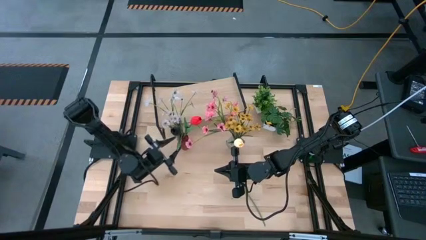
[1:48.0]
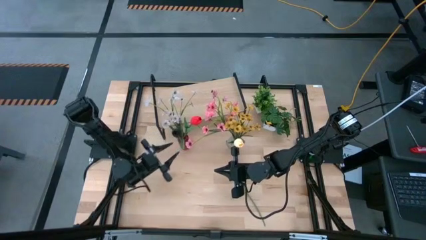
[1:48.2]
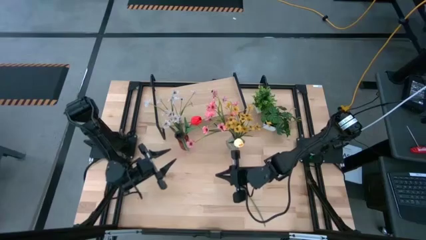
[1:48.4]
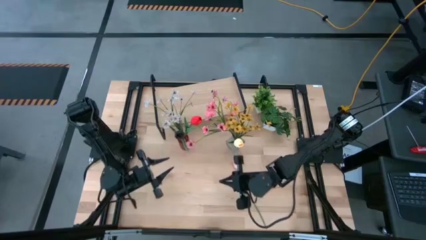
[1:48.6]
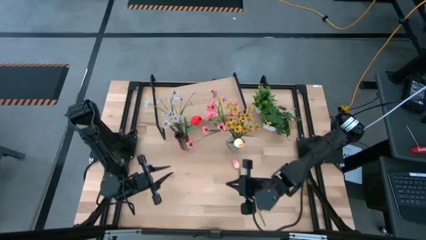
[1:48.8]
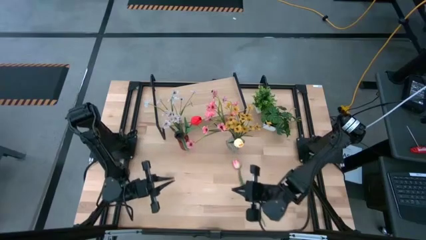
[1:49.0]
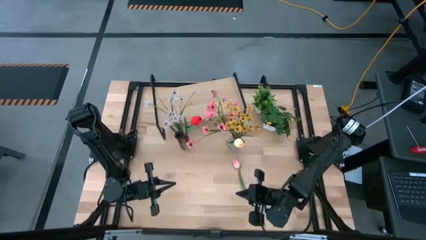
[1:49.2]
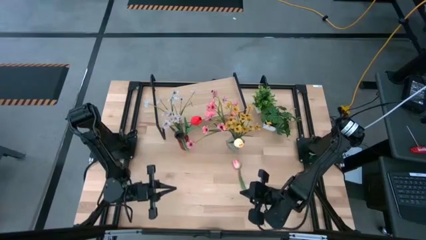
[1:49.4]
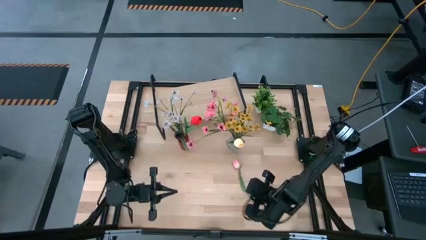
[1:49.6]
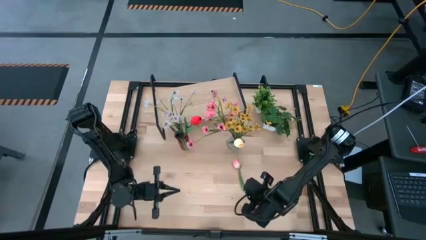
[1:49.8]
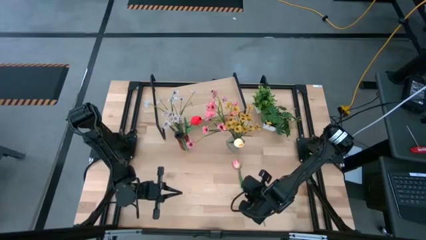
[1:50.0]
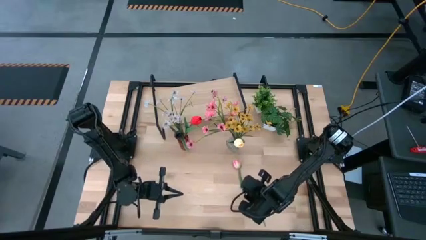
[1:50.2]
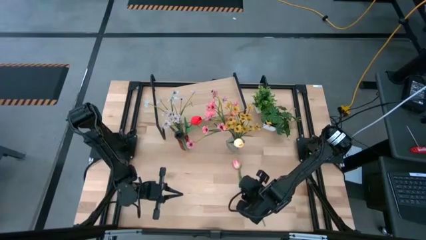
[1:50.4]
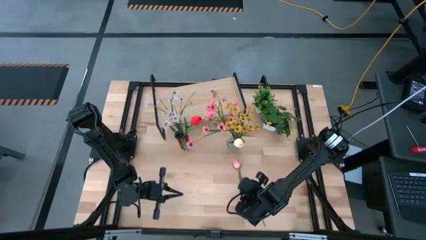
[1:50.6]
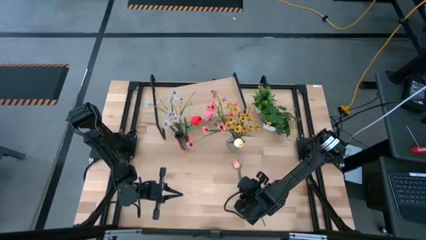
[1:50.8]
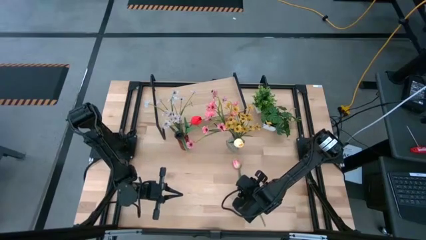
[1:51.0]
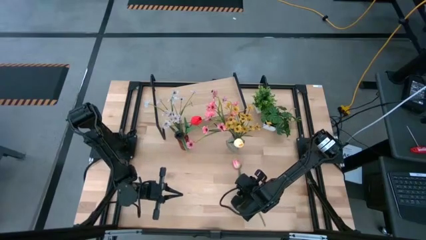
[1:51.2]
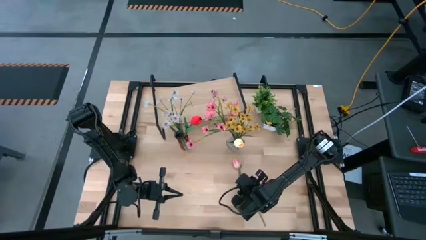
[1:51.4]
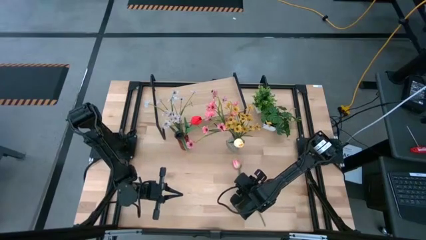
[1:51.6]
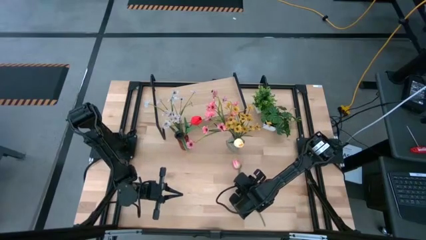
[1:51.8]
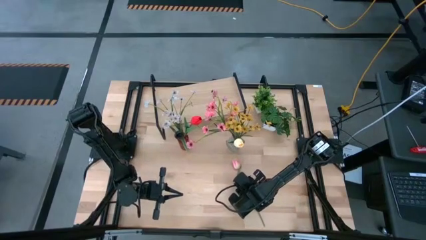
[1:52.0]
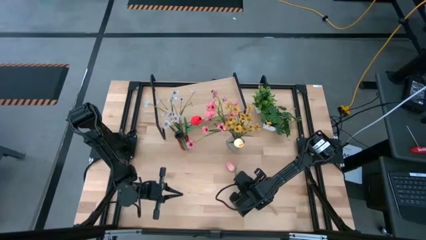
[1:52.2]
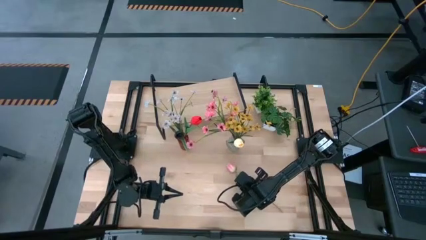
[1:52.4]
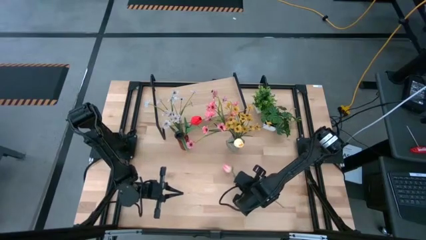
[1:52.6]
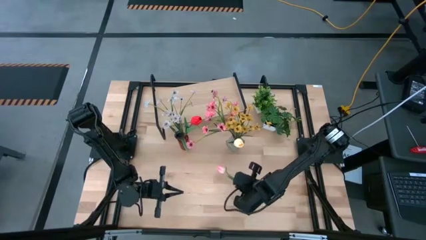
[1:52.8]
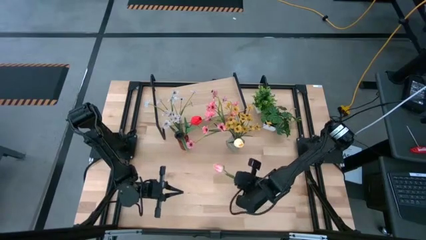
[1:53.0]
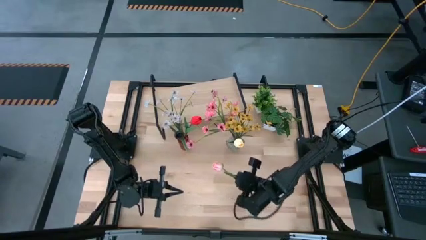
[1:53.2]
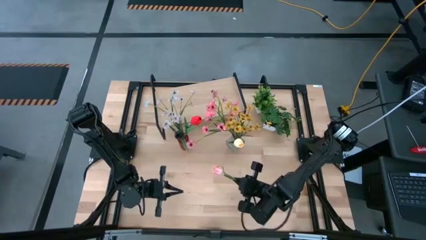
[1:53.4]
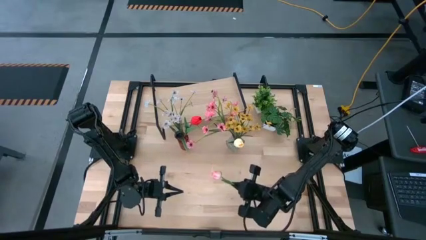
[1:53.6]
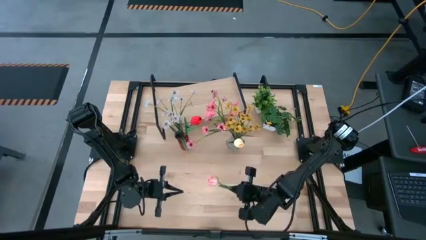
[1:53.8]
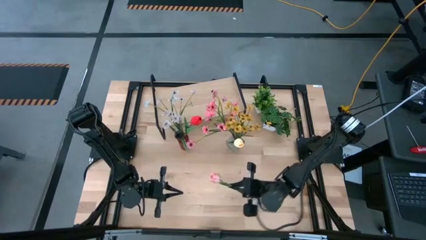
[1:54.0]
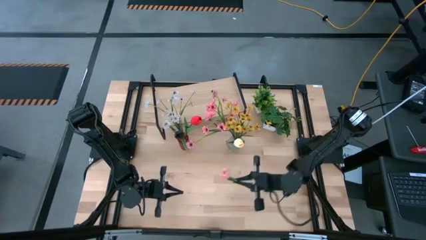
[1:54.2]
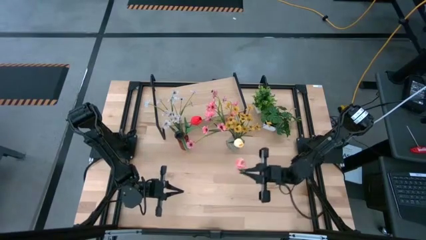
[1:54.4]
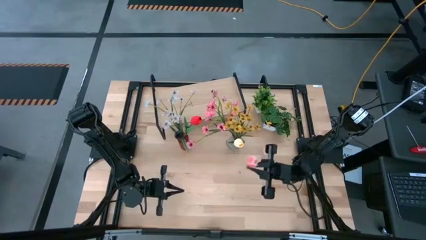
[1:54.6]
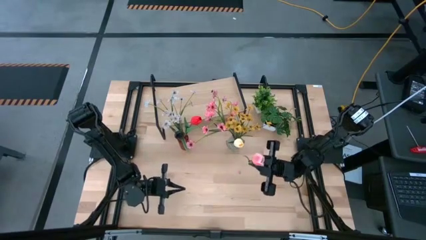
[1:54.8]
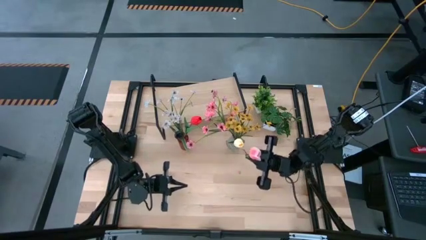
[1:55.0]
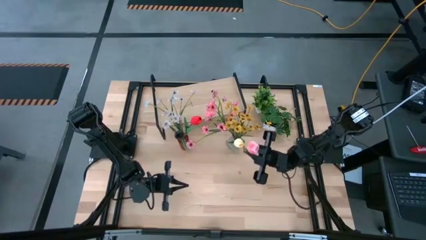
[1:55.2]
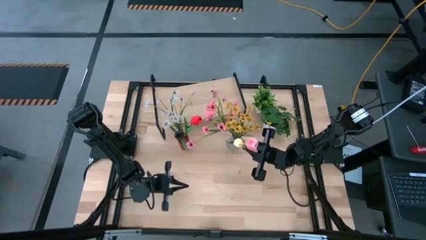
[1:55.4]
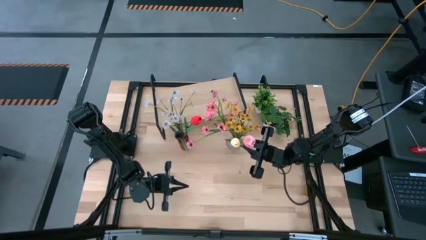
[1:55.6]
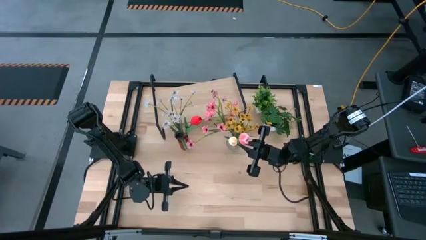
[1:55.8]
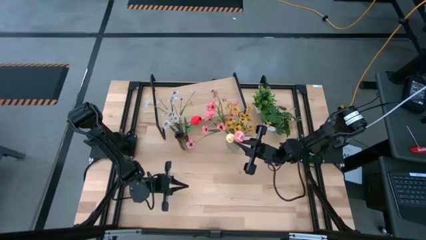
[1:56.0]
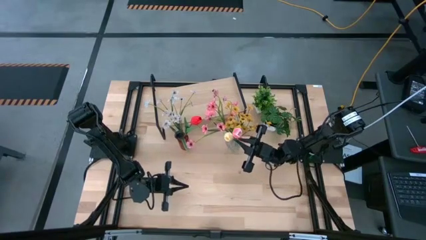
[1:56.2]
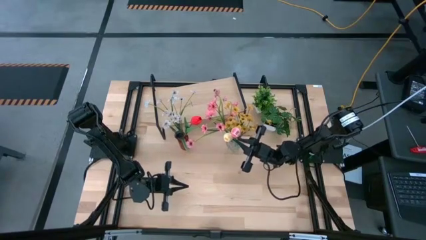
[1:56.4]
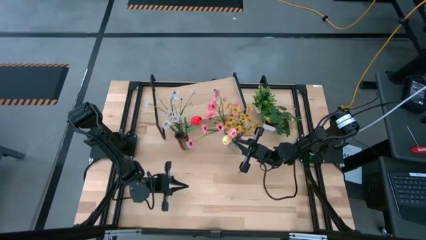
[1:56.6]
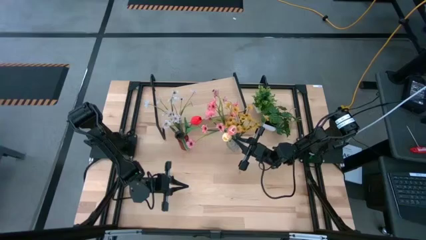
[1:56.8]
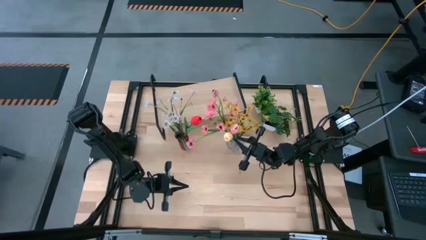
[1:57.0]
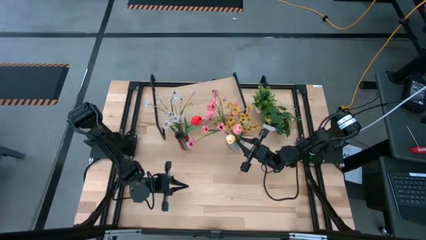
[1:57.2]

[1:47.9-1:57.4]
Task: Pick and place flowers into a vace then onto a shelf
Put the pink flower into the transparent flower vase

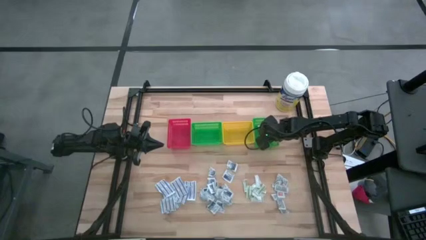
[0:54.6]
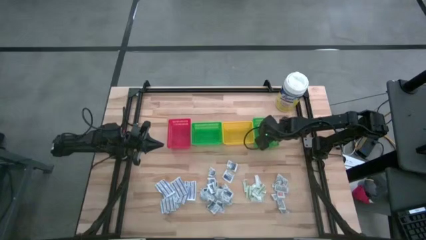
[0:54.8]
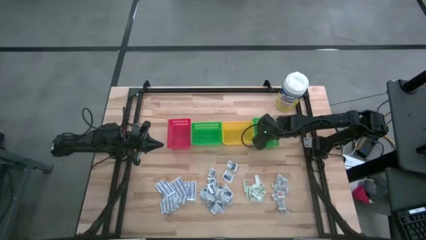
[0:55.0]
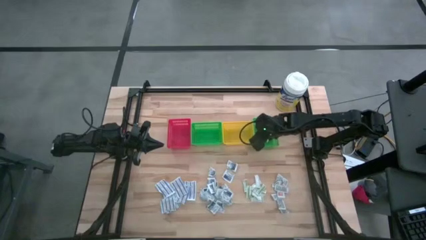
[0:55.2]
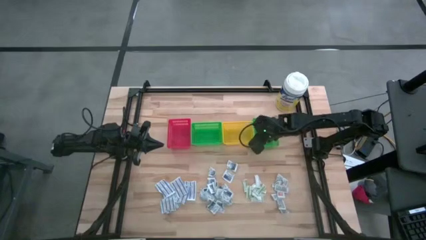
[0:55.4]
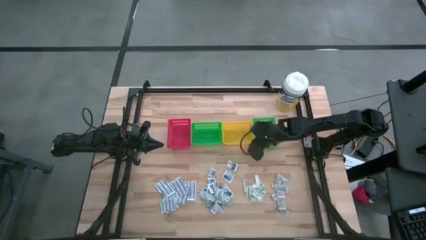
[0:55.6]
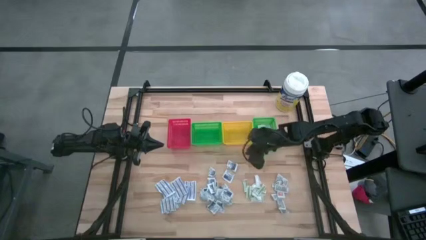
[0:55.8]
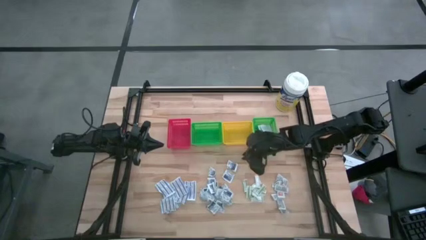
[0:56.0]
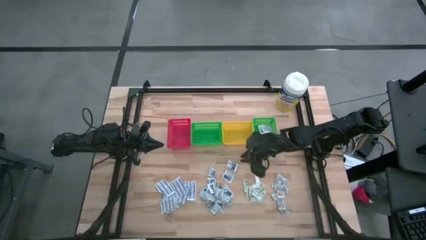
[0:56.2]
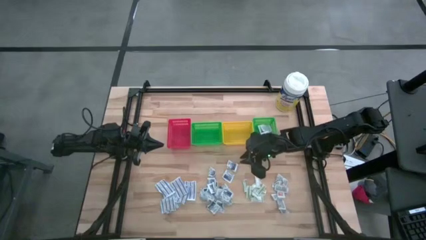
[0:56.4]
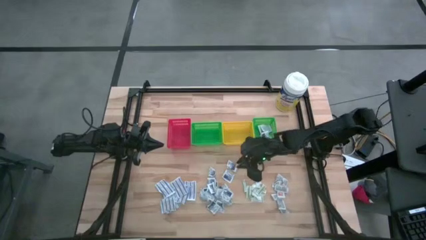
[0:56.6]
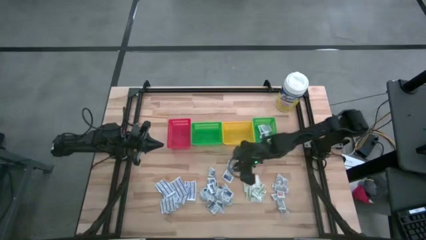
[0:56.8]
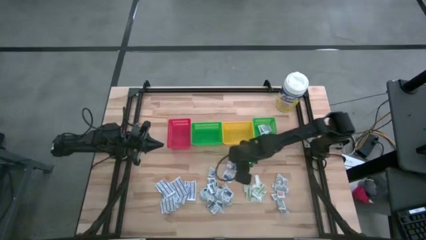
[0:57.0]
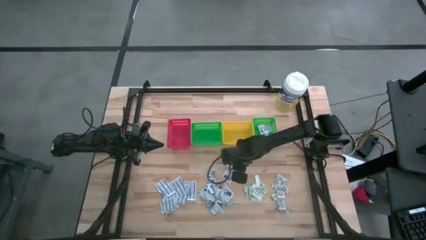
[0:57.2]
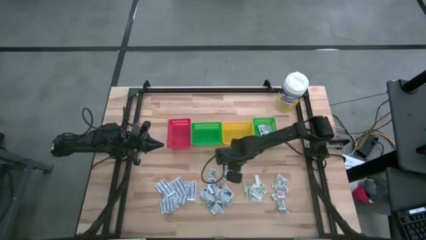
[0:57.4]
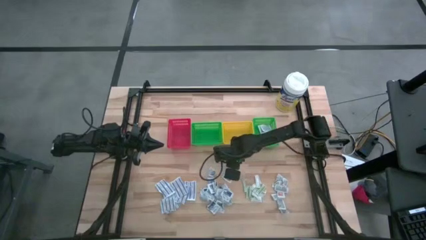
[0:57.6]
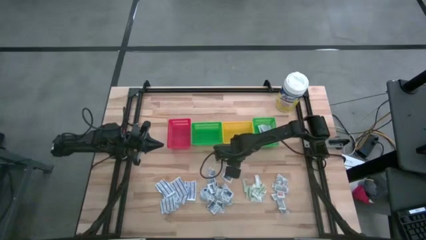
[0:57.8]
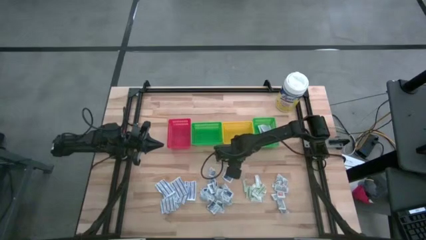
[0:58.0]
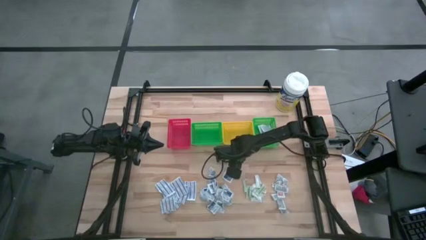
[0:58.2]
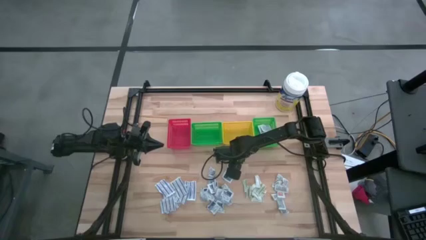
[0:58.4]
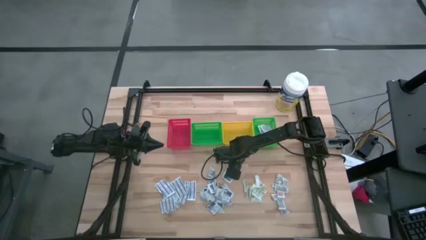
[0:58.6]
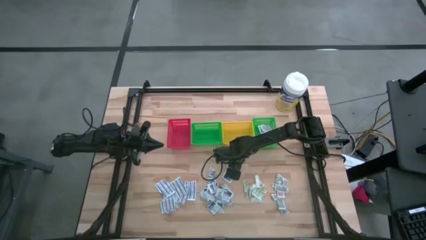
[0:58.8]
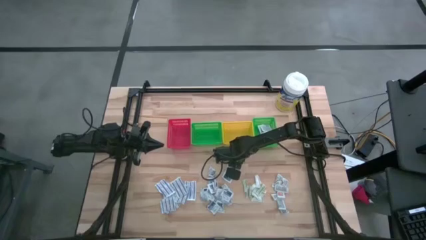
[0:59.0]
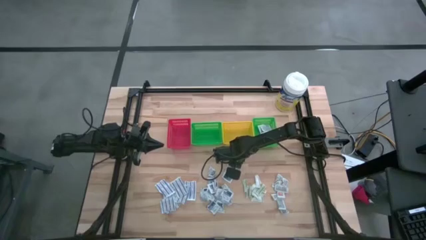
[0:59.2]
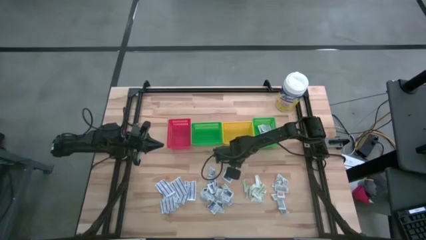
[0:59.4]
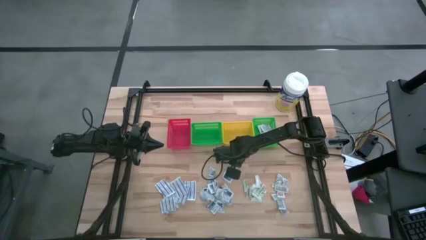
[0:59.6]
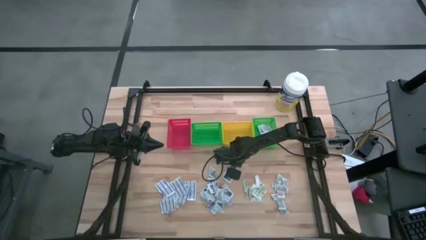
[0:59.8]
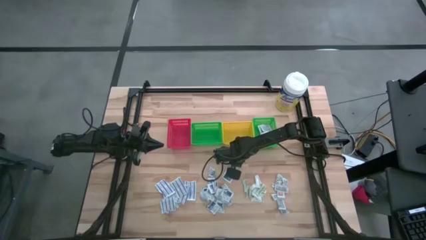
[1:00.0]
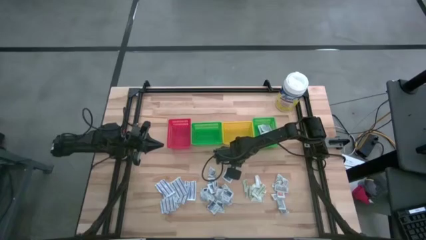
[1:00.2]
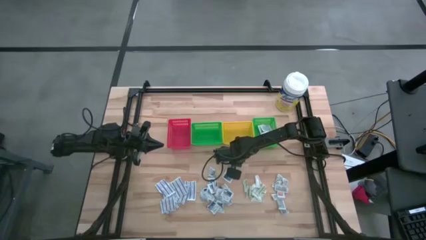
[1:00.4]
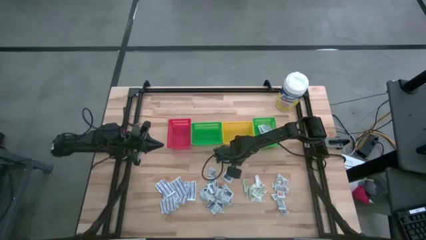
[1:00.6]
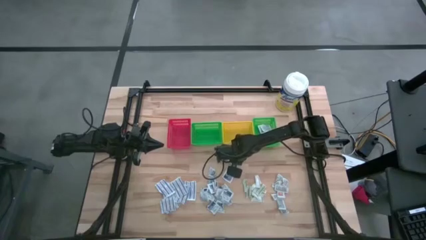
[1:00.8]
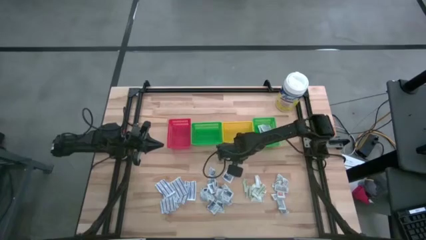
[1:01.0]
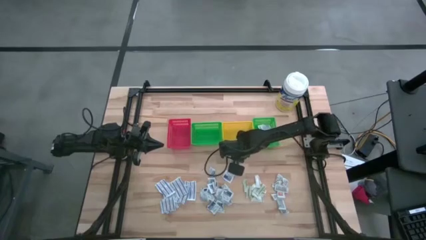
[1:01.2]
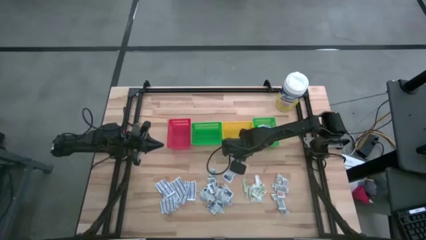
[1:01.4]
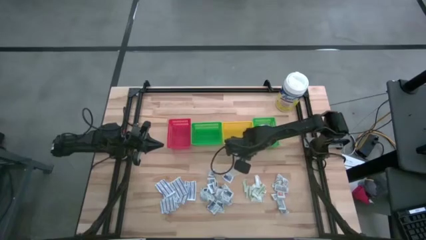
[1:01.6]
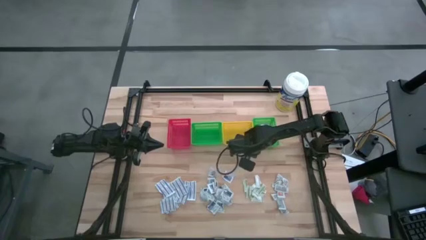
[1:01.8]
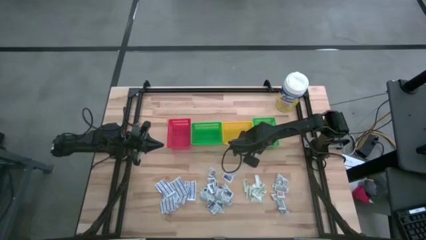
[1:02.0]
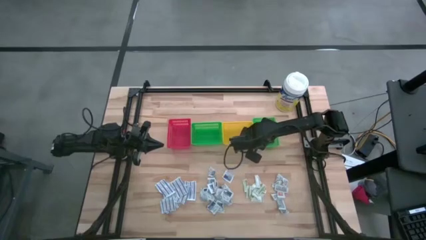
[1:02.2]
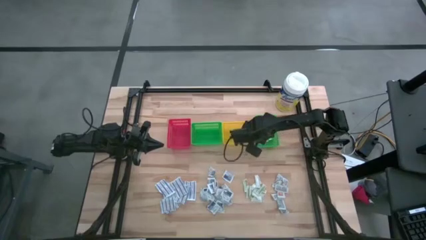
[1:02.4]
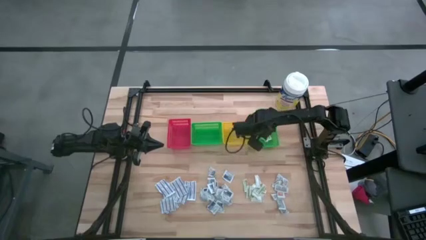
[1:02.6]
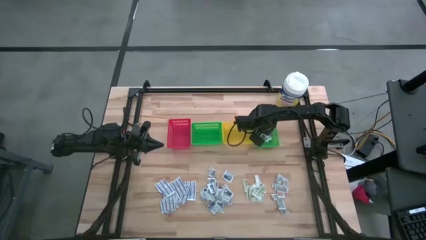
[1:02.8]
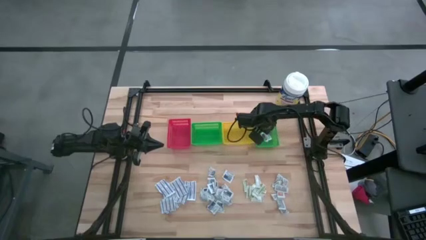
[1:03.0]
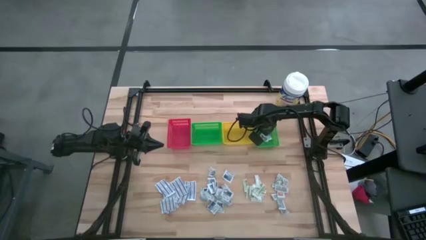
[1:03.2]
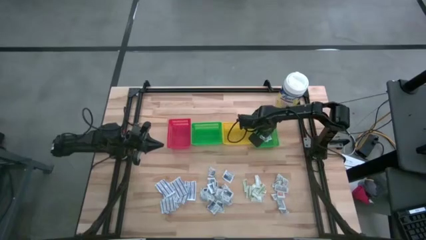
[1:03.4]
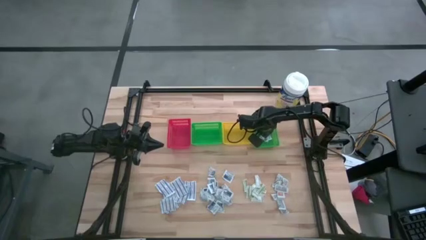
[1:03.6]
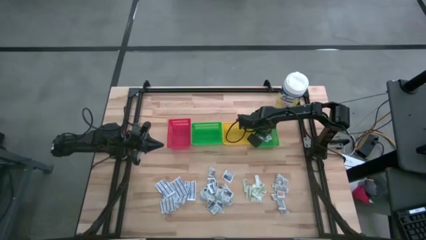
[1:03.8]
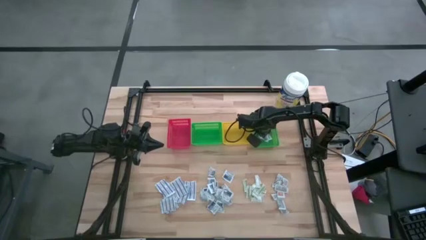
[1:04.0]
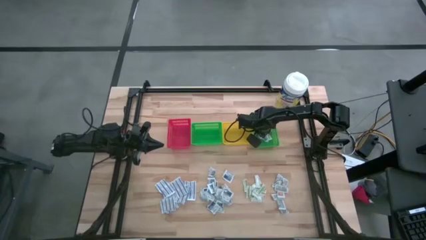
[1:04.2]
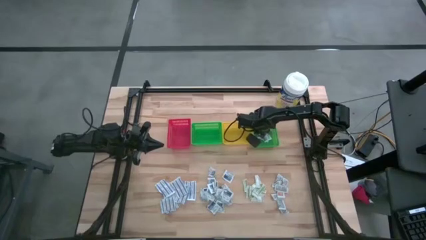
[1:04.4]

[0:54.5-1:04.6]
Task: Pick & Place First Aid Supplies
Put the blue alcohol pad into the right green bin
